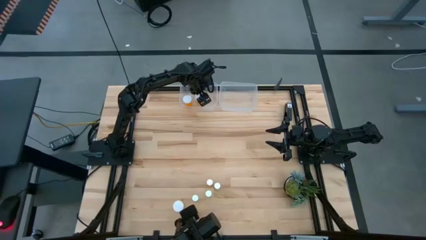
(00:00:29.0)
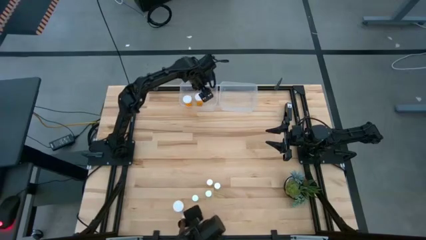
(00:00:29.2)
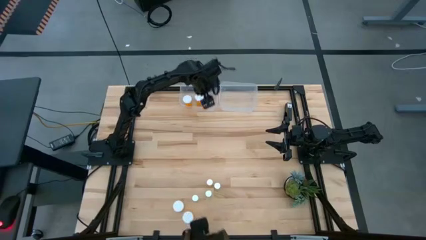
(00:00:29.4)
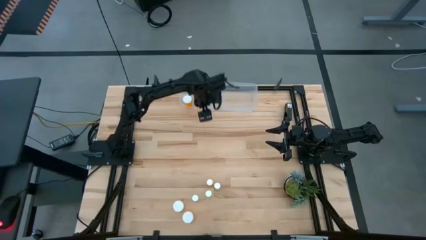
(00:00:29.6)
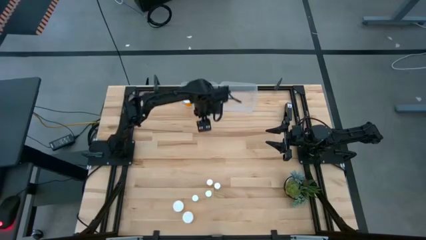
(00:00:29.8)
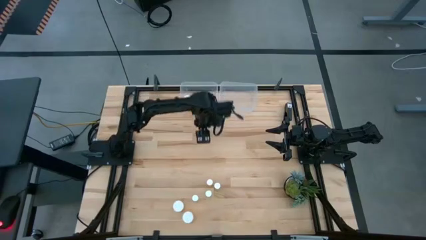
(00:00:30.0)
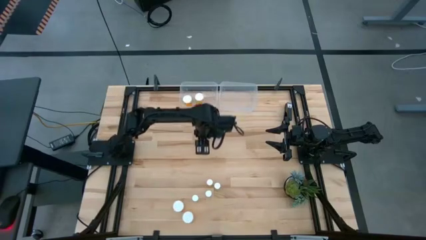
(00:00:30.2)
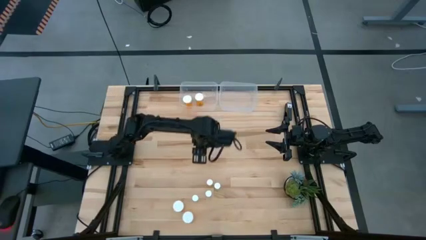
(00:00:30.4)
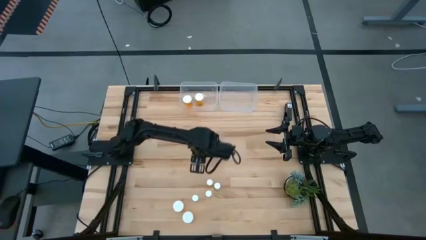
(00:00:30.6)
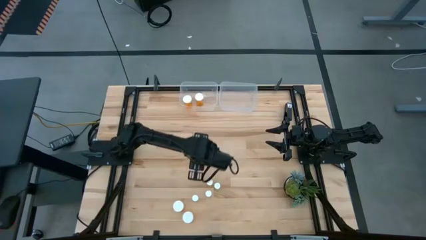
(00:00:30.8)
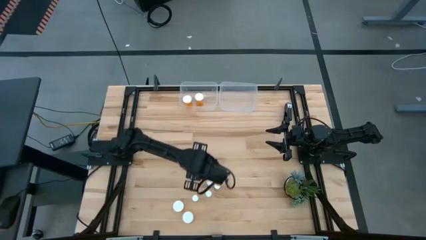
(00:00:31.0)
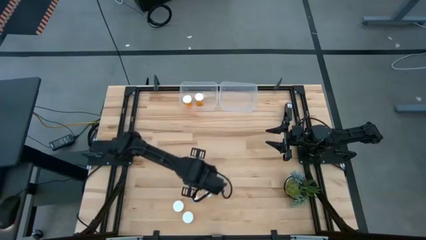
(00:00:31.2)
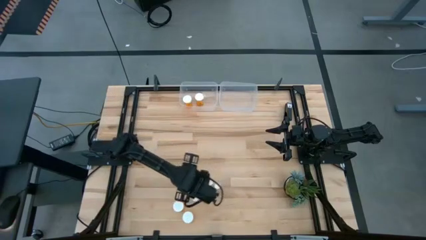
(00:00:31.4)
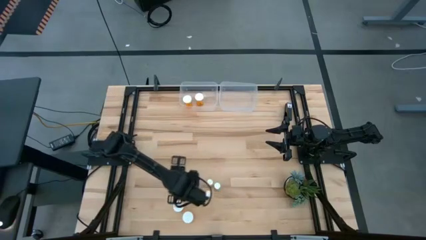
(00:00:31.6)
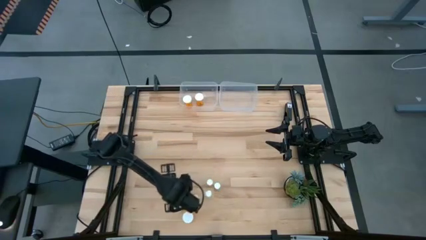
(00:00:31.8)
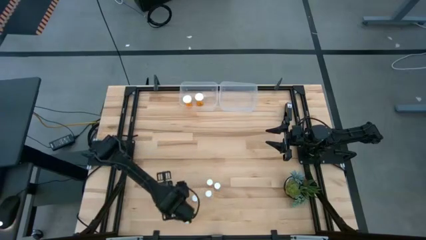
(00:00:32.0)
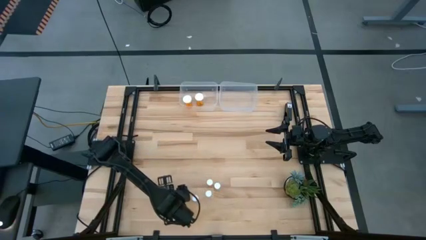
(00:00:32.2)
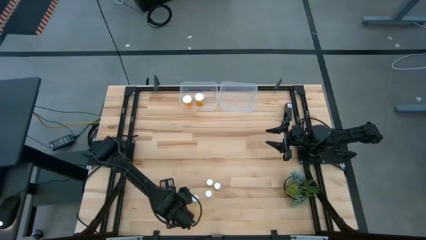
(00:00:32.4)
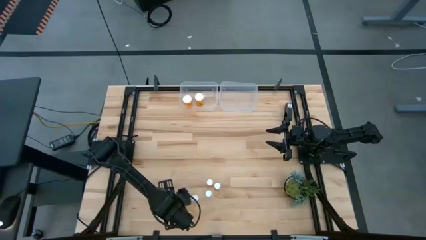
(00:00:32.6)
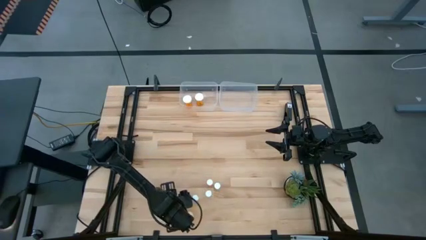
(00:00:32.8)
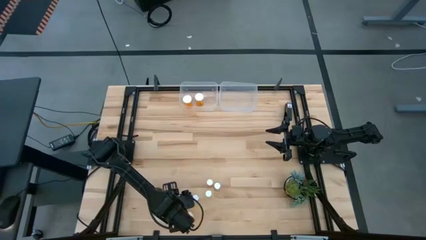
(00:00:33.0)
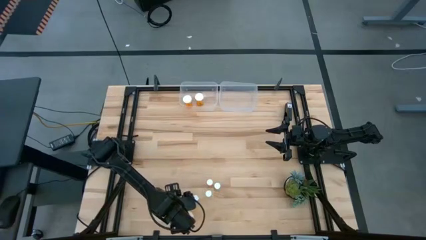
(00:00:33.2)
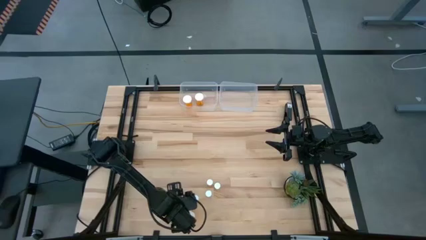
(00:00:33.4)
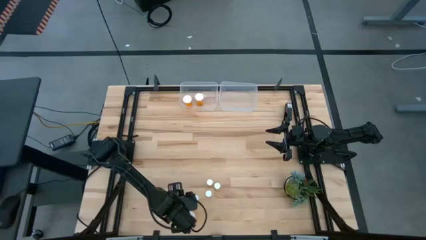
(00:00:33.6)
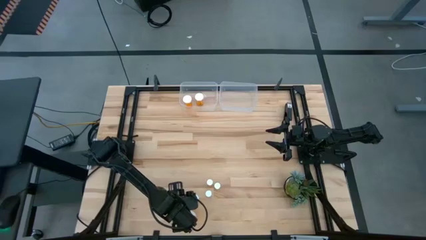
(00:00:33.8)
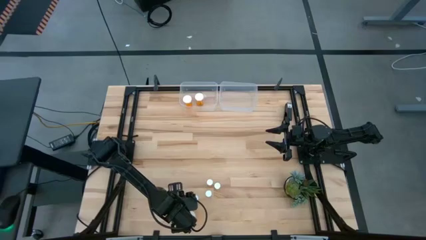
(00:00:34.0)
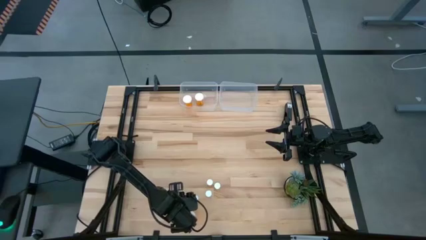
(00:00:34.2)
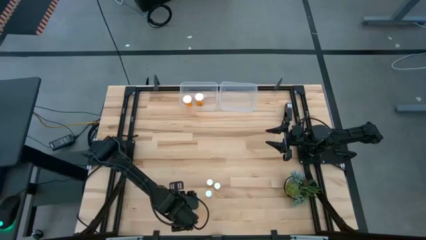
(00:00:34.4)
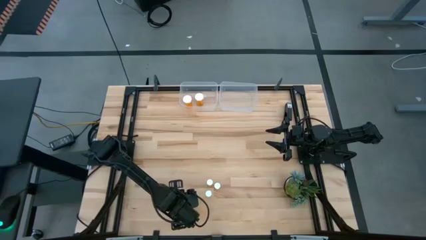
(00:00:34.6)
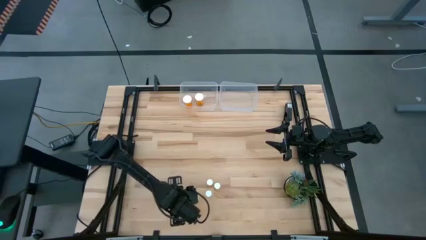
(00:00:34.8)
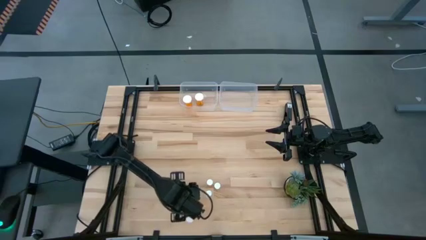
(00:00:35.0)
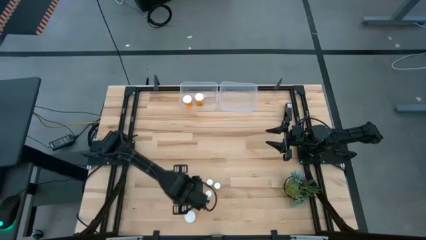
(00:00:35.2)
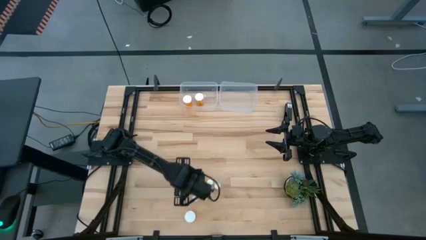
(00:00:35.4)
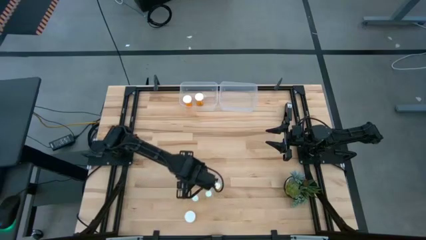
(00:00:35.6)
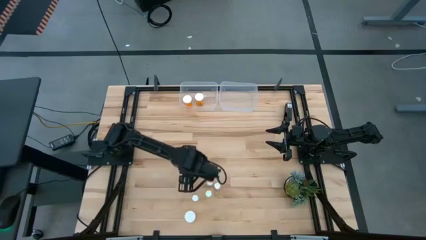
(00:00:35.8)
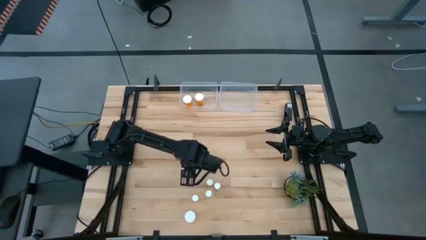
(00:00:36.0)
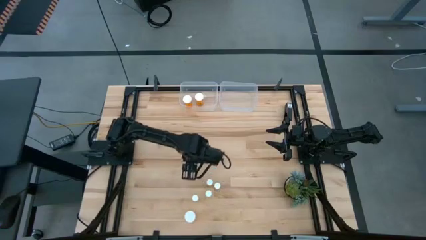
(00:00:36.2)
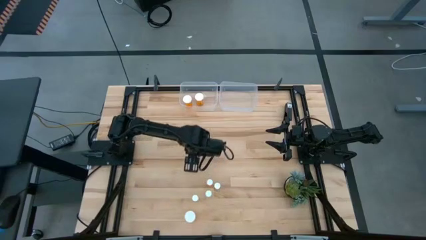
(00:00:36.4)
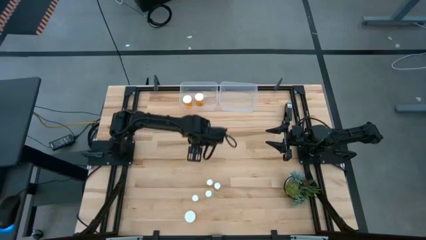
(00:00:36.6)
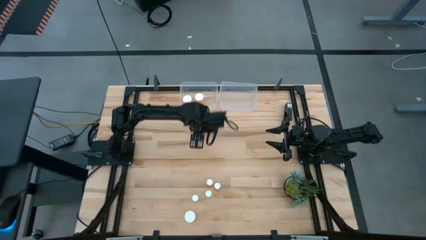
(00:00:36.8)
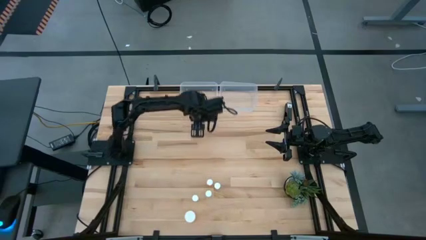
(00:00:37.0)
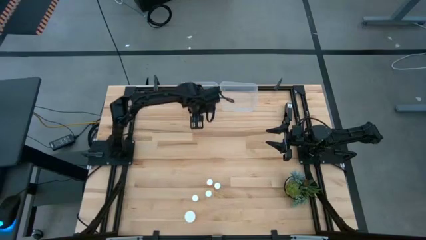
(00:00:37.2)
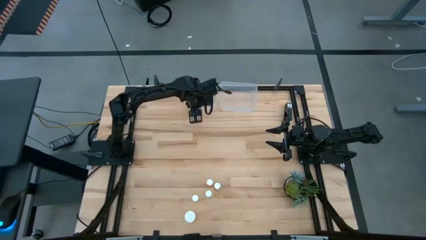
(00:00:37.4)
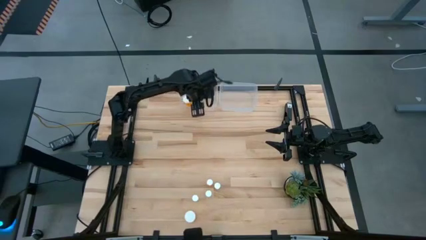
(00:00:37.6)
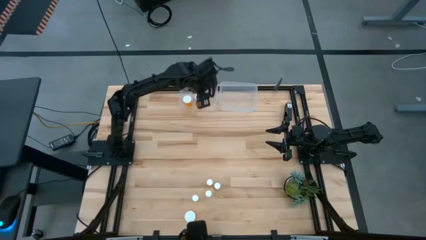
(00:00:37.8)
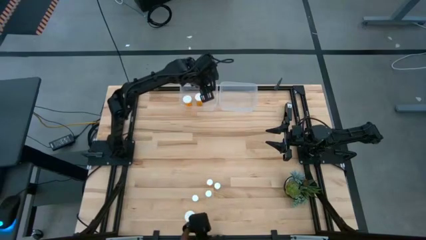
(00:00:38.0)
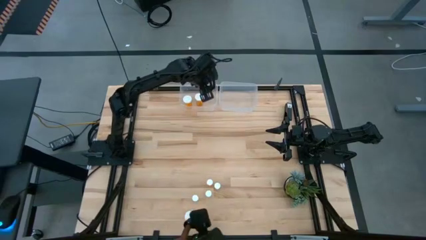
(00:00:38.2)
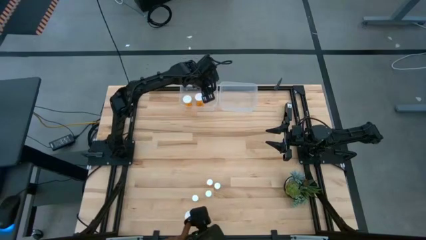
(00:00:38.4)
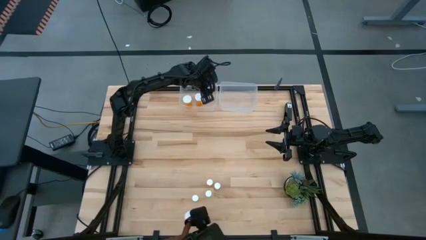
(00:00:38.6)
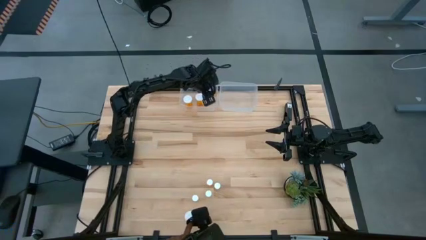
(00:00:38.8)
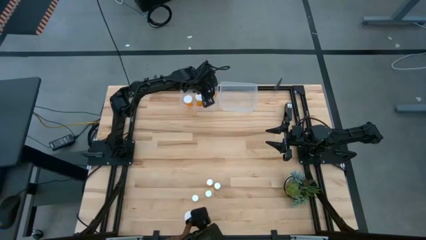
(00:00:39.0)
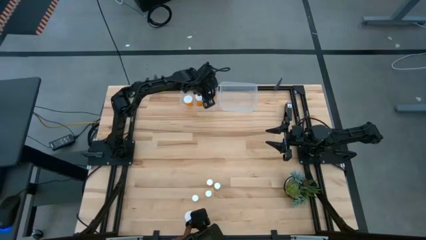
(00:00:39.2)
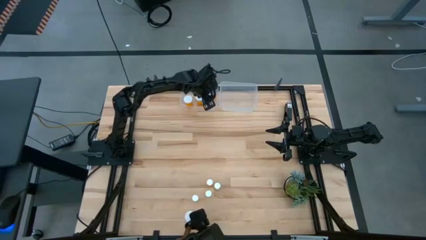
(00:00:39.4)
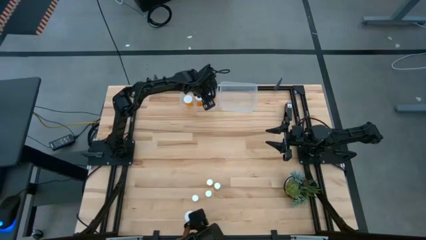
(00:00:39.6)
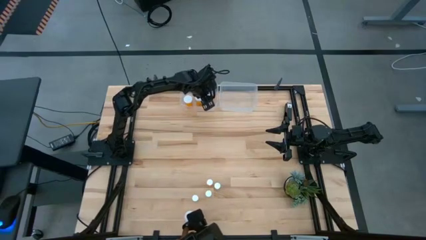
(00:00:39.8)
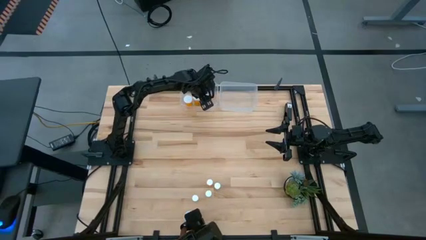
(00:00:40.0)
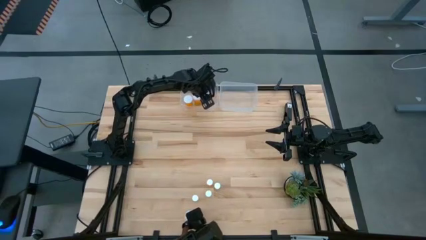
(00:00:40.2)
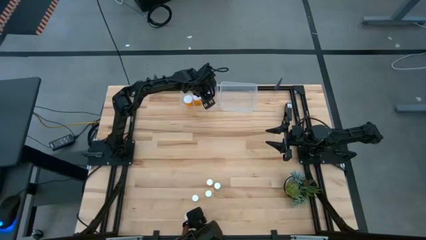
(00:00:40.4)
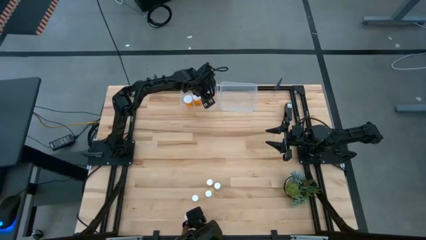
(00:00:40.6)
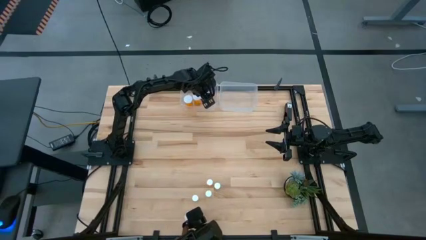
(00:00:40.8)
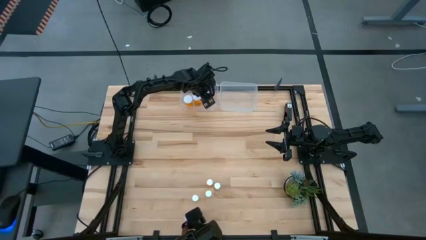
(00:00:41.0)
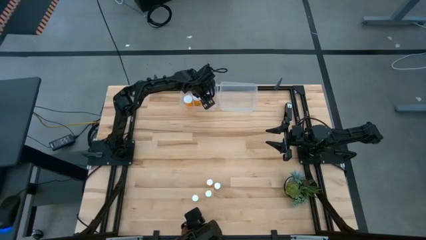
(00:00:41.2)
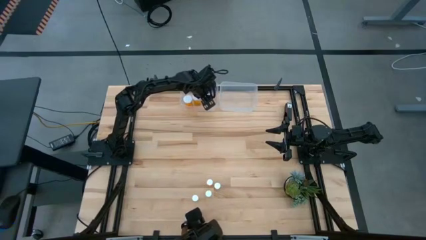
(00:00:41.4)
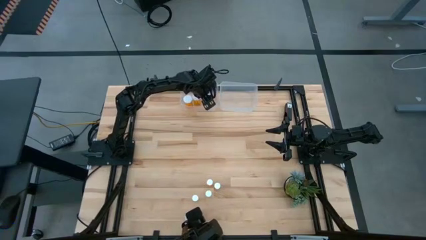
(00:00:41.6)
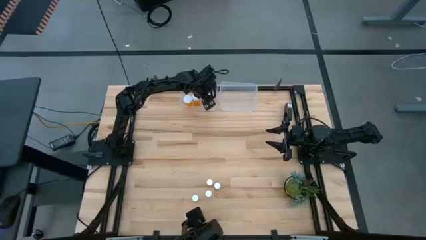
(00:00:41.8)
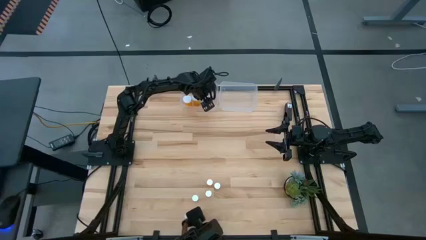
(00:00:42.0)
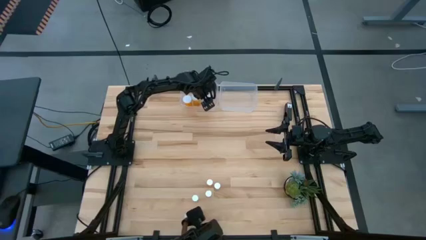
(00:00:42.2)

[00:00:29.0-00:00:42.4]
Task: Pick and place medicine bottles into bin by pill shape (circle, oval)
Put the large orange pill bottle into the left transparent bin

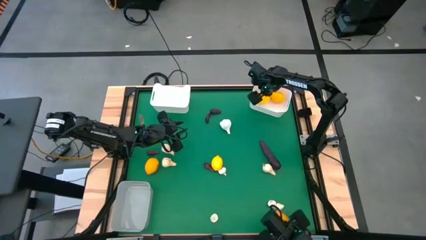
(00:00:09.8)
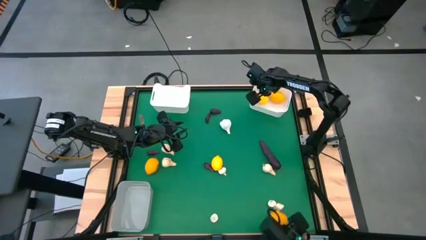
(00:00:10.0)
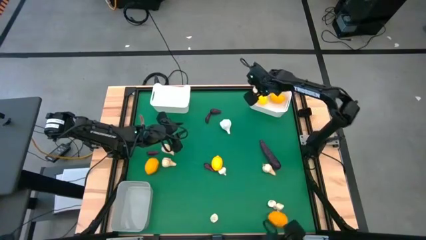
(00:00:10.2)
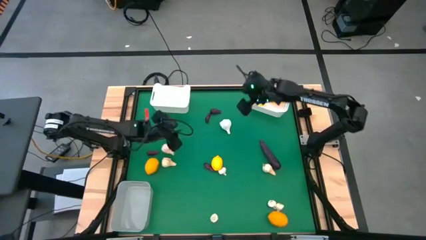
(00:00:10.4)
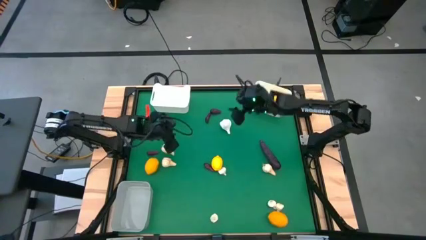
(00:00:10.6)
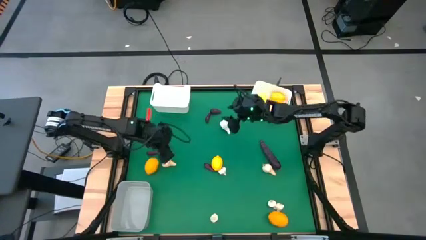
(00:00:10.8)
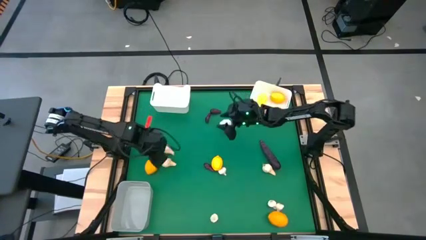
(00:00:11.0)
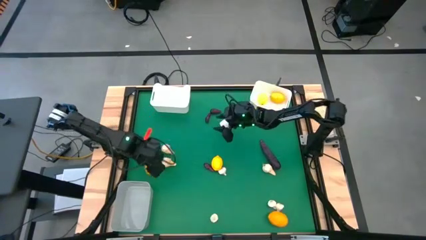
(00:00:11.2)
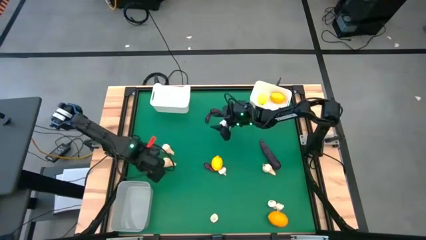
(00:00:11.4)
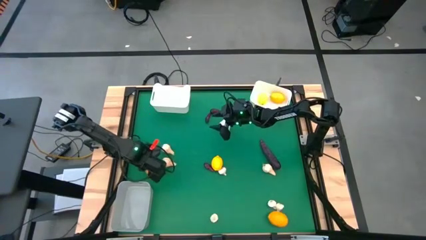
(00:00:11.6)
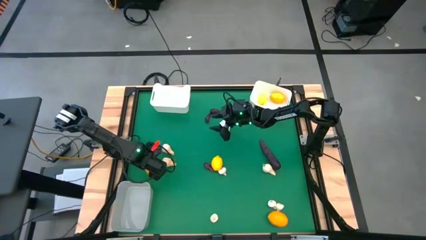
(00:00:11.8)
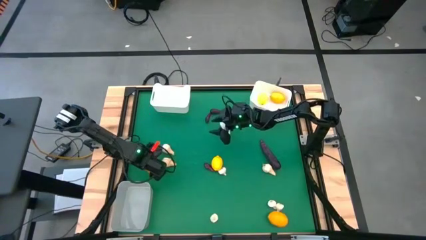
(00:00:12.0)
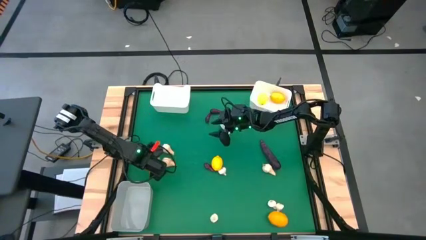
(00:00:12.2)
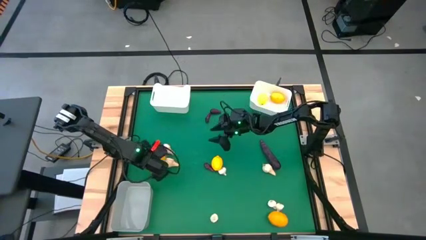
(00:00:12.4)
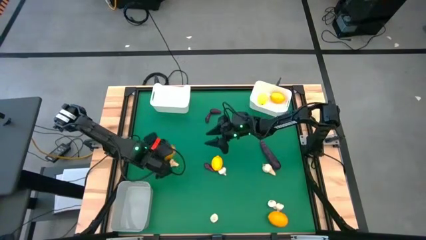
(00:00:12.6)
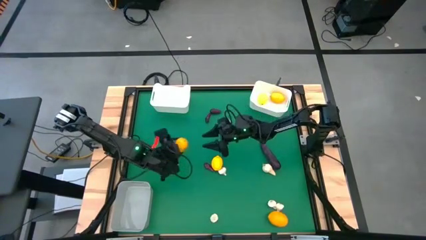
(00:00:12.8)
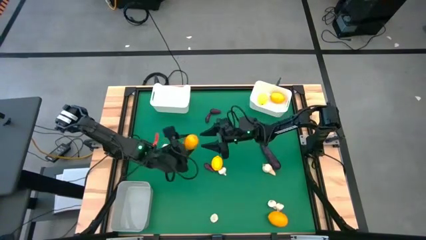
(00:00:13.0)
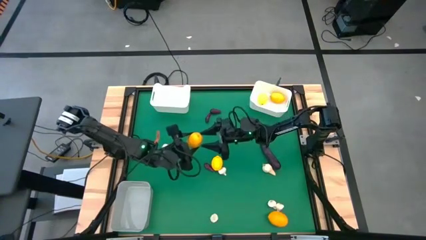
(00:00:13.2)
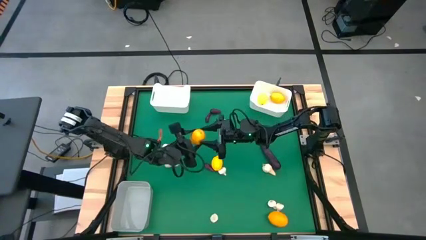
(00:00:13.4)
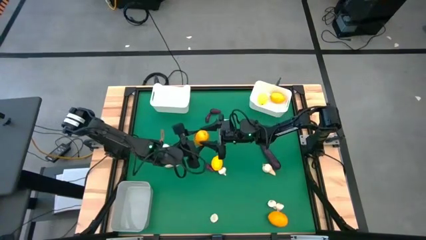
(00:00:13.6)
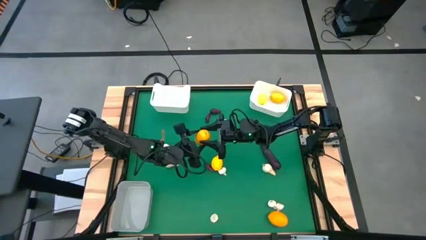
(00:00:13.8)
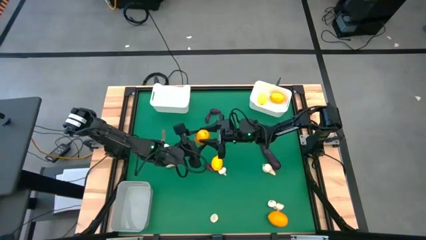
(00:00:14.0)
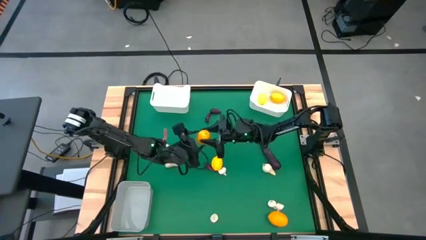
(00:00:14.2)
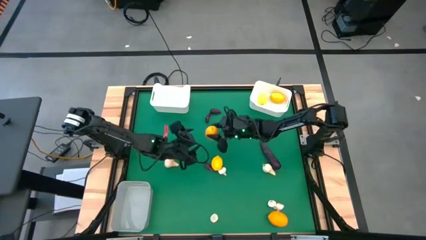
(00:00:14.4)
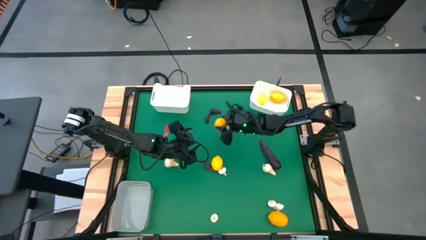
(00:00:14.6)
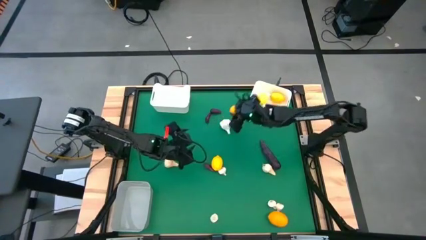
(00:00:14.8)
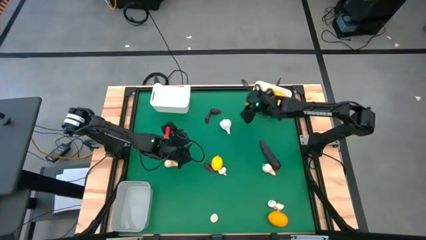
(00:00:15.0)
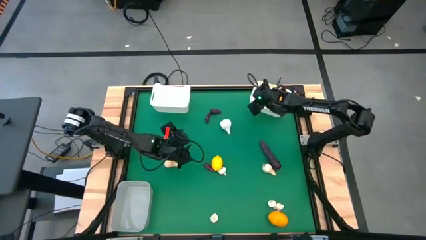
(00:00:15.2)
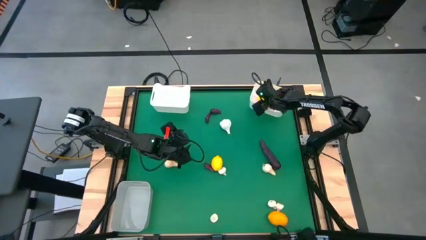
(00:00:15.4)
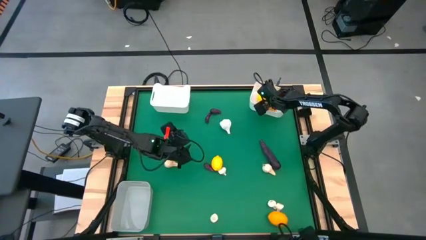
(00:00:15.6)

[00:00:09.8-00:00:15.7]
Task: Sort produce into baskets
Put the top left yellow lemon into the right white bin
